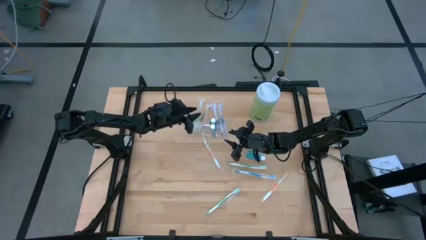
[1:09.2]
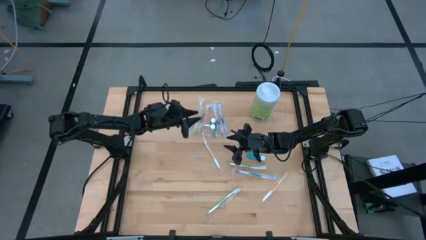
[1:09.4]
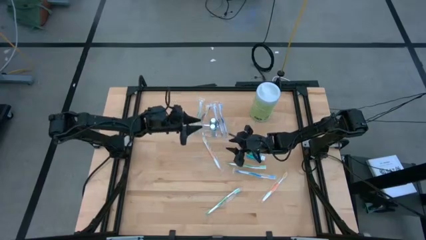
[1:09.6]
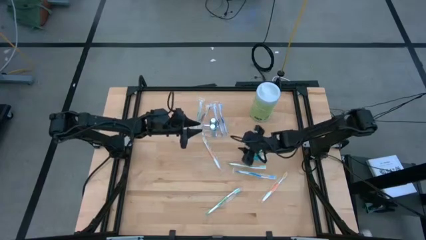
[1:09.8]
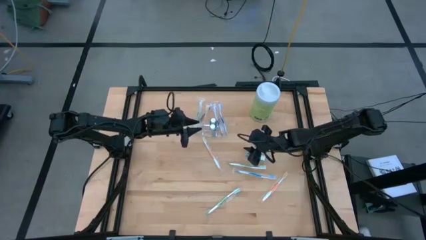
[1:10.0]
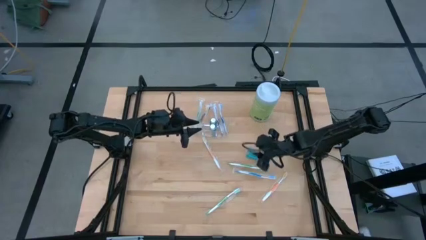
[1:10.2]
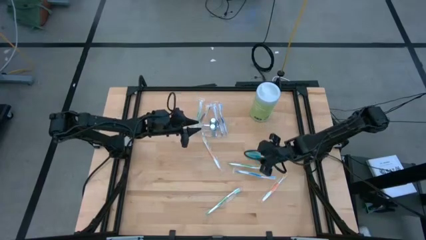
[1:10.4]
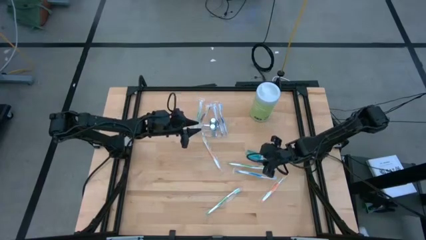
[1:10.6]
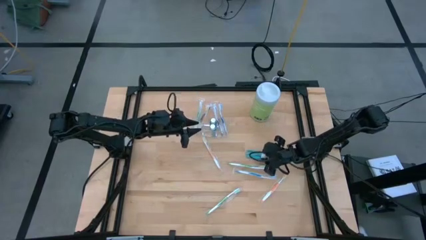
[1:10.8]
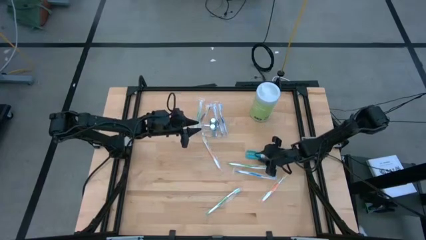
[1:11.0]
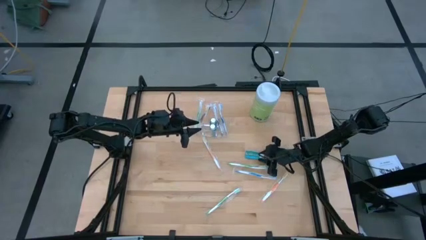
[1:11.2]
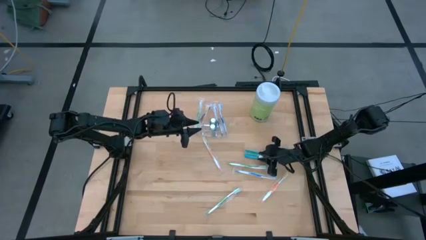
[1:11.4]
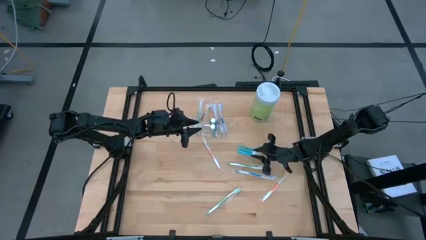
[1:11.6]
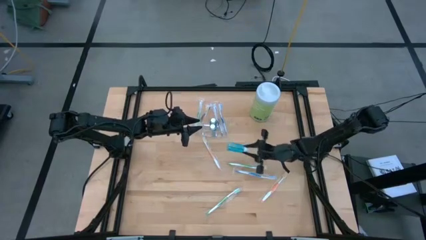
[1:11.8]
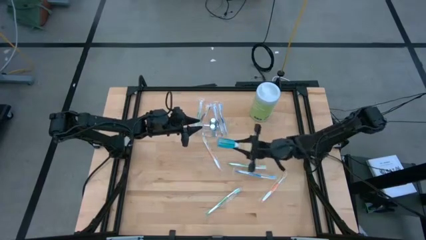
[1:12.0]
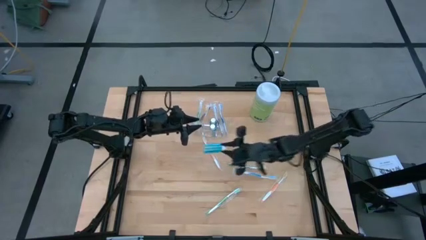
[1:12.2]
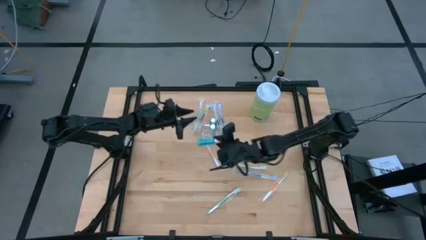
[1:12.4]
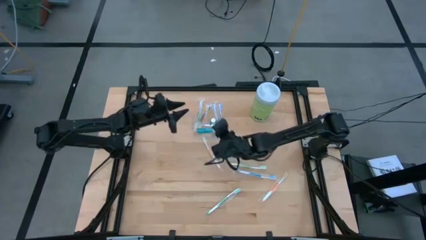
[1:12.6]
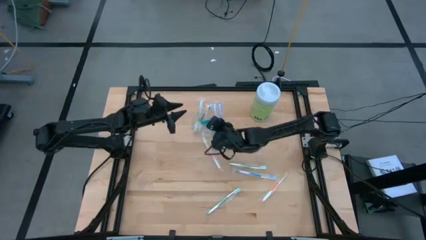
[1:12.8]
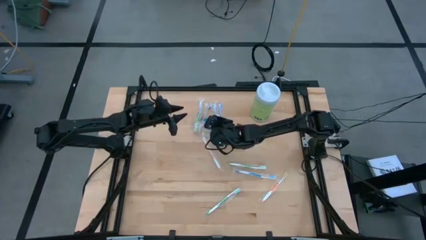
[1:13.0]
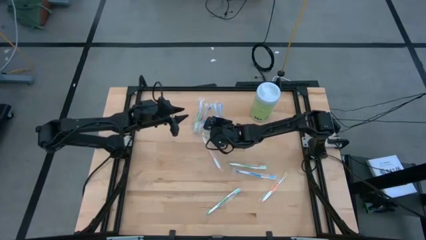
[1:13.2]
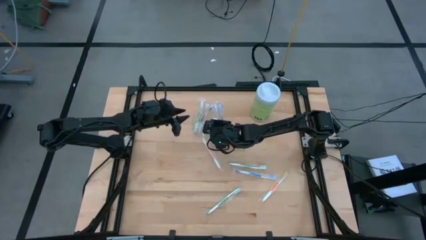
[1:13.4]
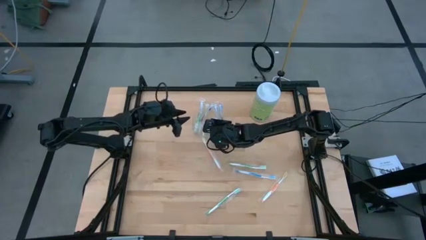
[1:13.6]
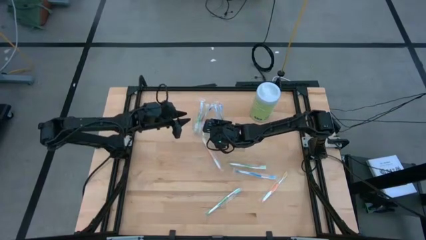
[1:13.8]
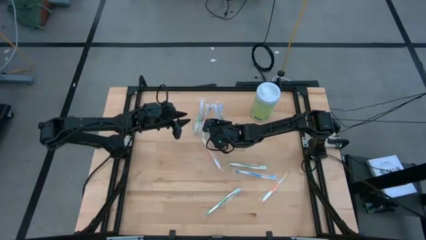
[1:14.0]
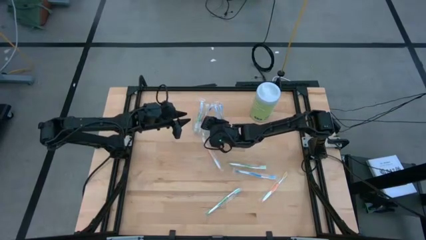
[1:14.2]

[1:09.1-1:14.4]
Task: Pick & Place toothbrushing station
Put the blue mouthwash into the transparent organizer

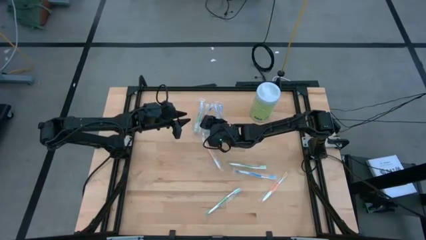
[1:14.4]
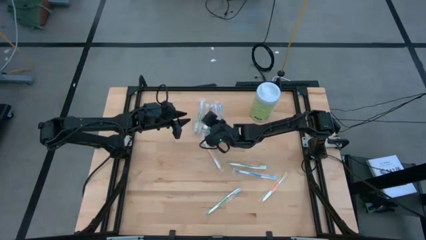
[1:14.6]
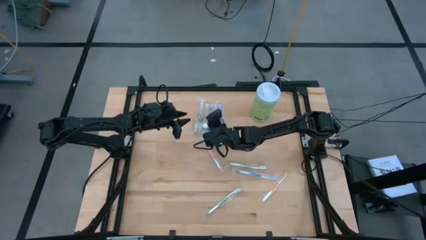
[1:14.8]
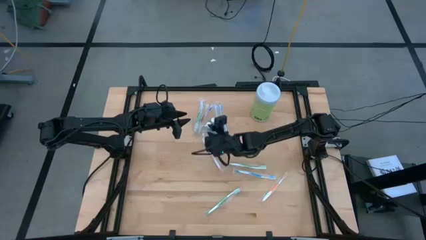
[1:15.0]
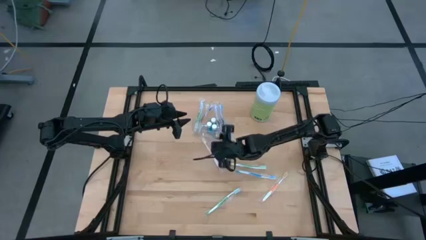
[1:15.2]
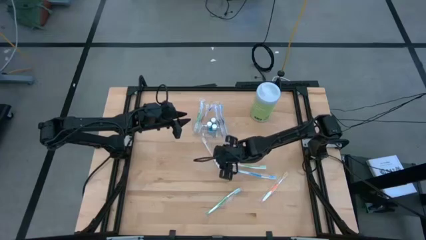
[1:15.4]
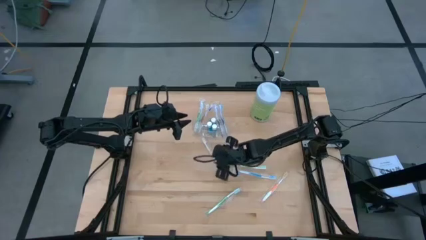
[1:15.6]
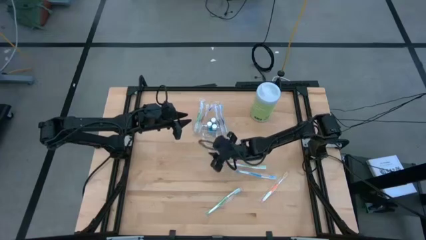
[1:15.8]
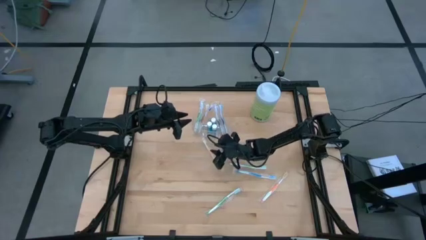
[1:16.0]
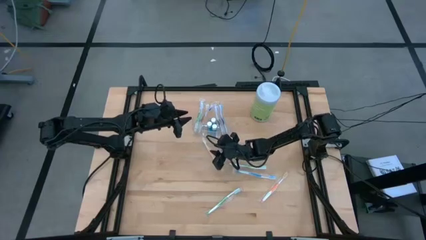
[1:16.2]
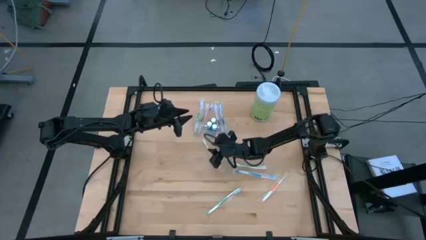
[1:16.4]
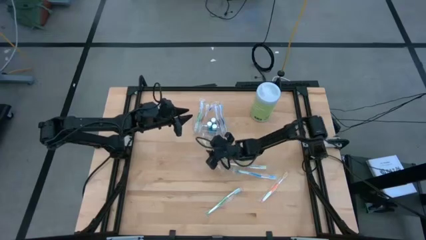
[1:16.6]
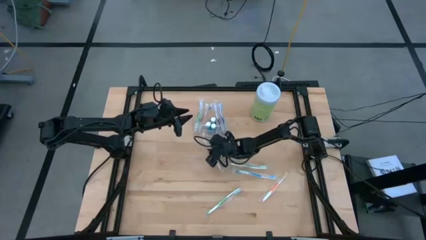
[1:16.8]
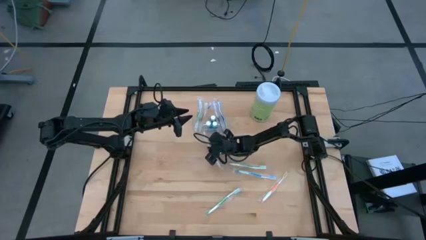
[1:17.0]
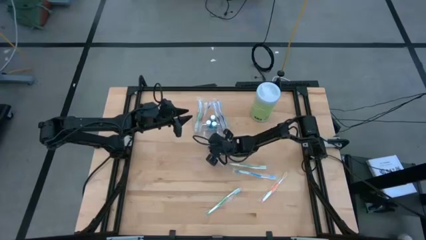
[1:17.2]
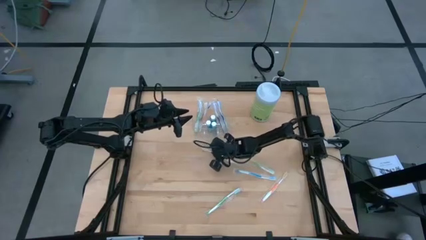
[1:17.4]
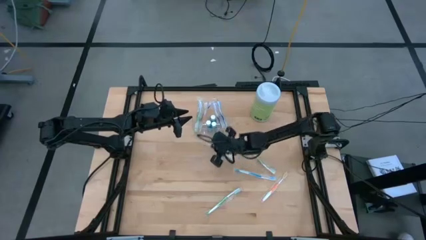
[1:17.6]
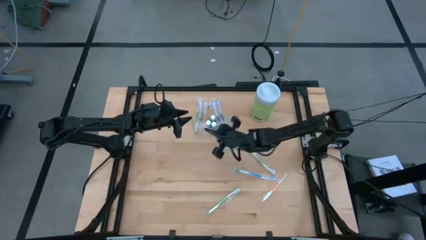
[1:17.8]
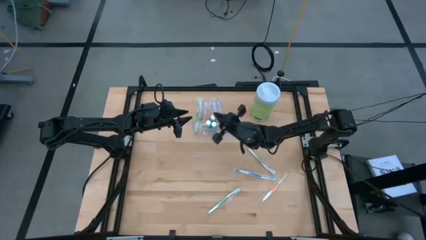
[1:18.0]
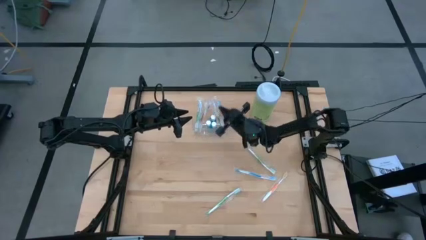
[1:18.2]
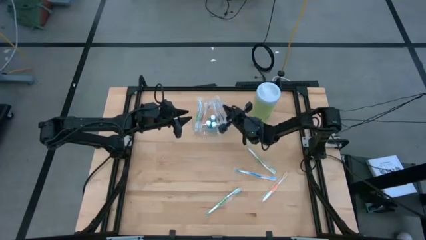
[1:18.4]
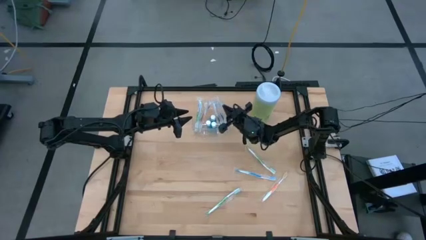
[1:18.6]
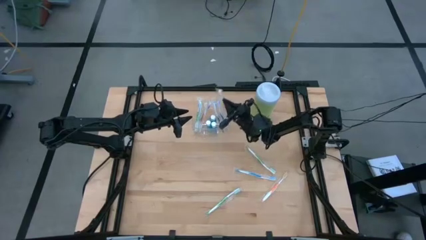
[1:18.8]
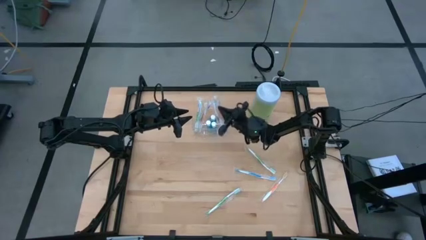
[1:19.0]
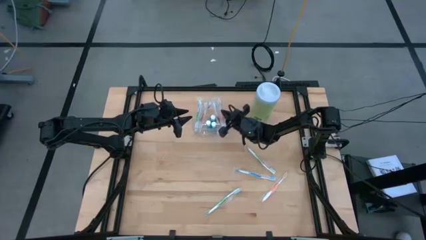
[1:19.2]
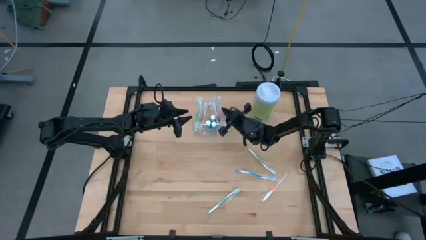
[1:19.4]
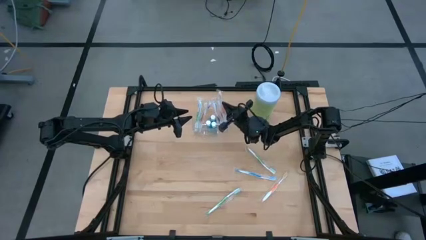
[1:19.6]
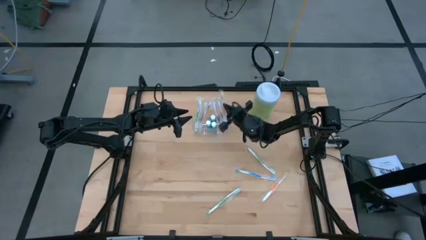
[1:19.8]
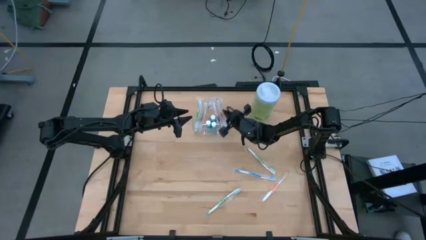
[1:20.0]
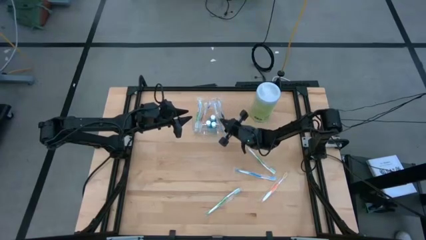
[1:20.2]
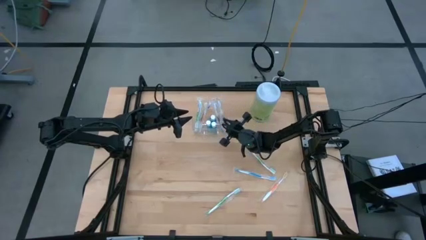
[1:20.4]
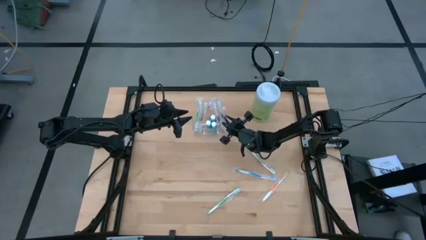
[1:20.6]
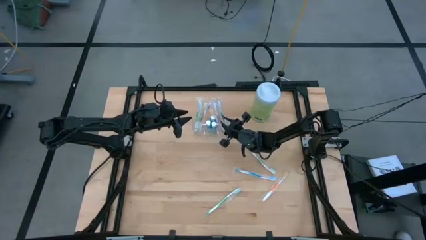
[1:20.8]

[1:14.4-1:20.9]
Put the orange toothbrush into the transparent organizer

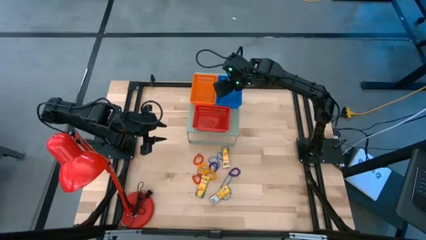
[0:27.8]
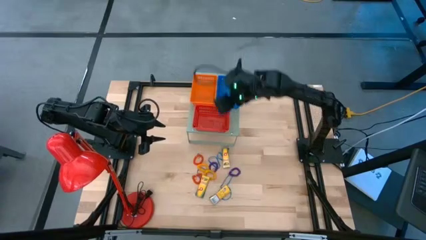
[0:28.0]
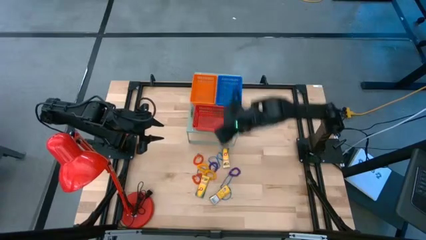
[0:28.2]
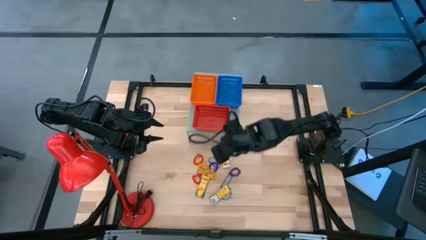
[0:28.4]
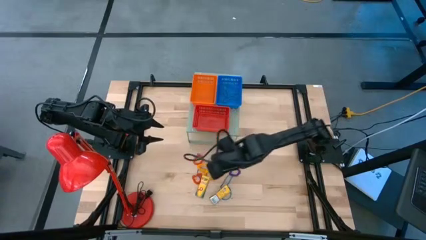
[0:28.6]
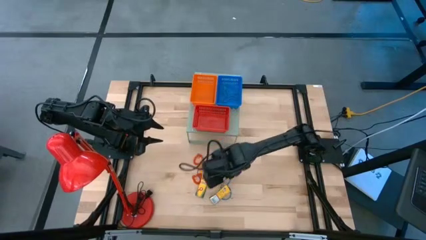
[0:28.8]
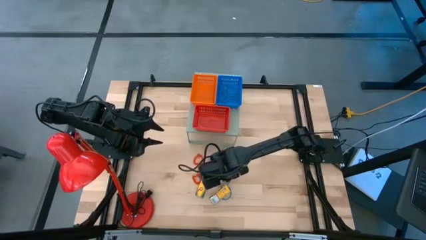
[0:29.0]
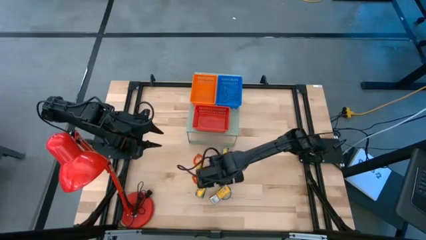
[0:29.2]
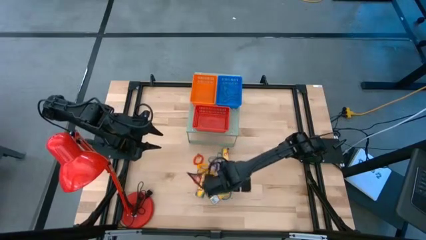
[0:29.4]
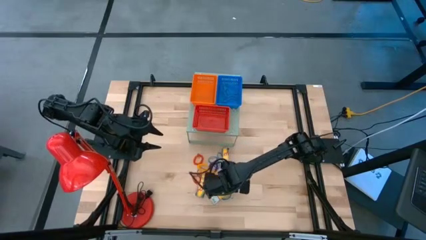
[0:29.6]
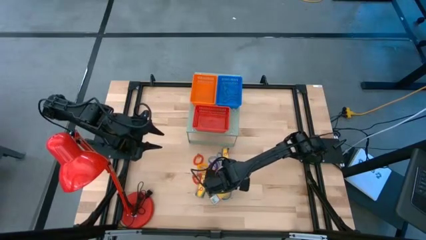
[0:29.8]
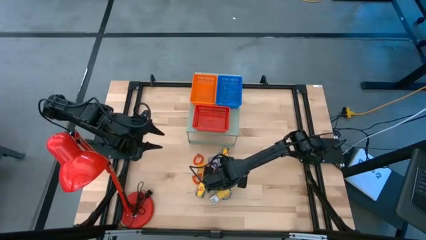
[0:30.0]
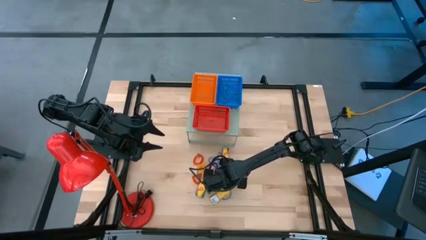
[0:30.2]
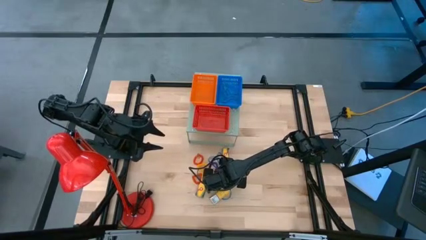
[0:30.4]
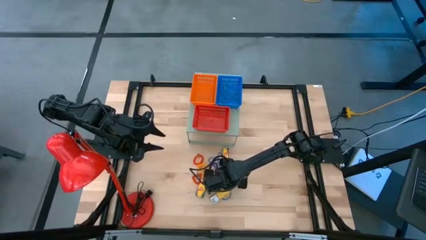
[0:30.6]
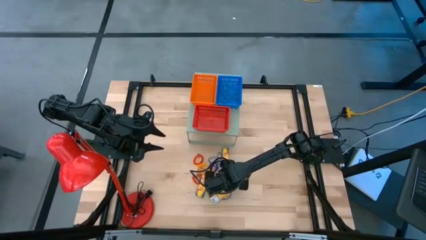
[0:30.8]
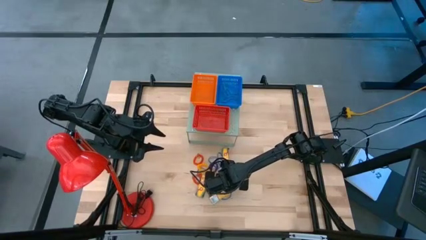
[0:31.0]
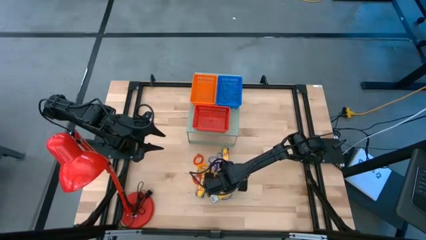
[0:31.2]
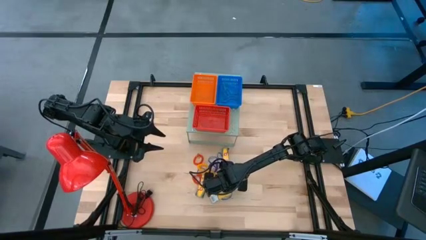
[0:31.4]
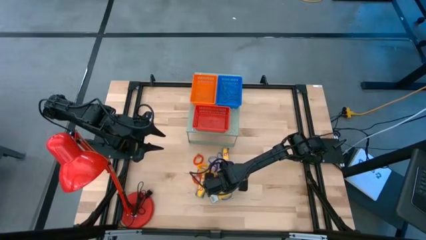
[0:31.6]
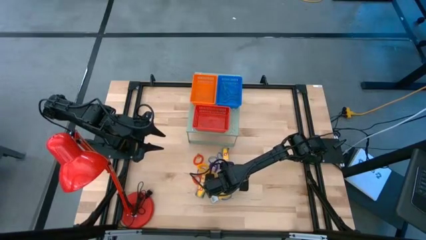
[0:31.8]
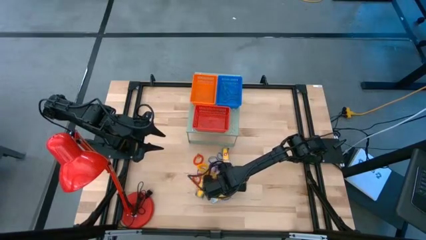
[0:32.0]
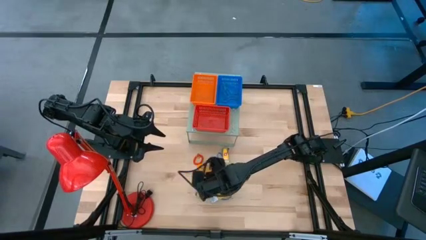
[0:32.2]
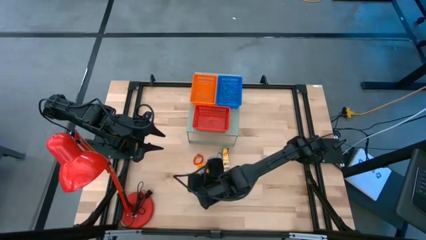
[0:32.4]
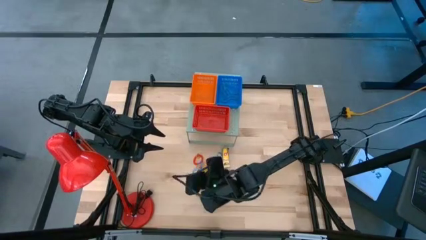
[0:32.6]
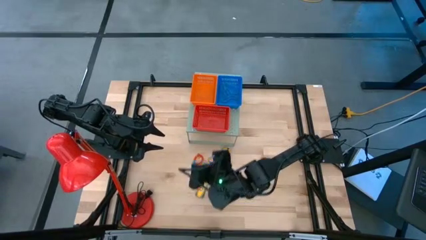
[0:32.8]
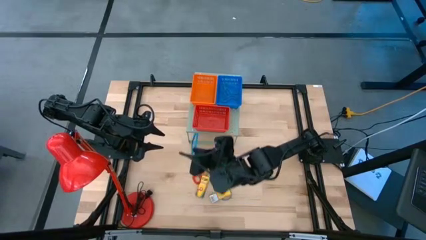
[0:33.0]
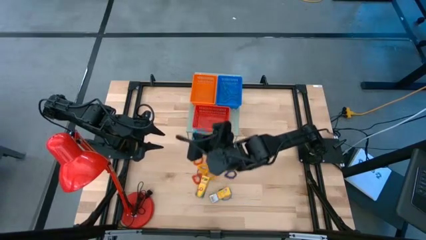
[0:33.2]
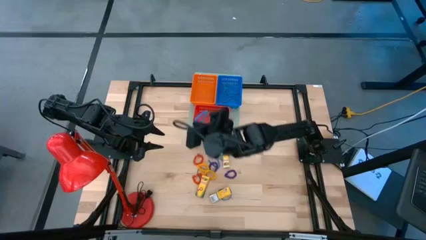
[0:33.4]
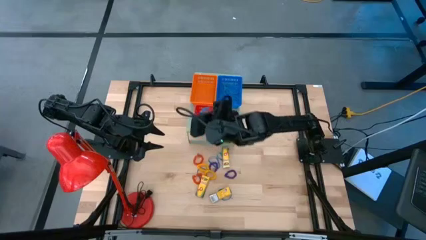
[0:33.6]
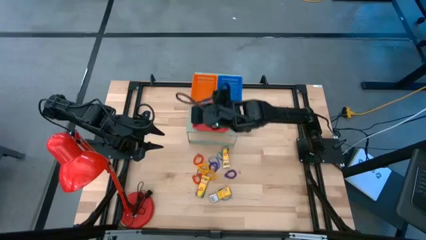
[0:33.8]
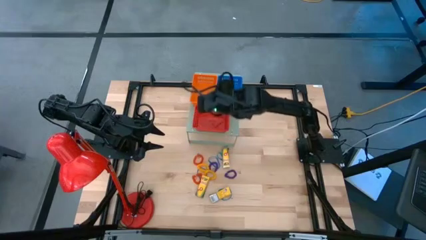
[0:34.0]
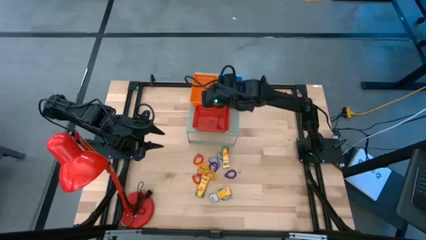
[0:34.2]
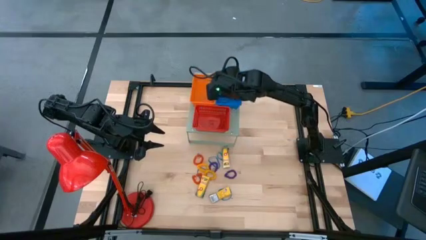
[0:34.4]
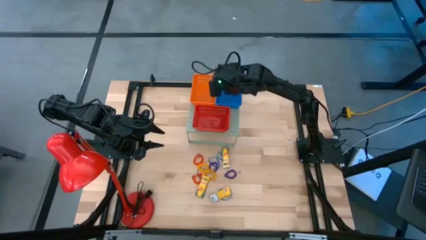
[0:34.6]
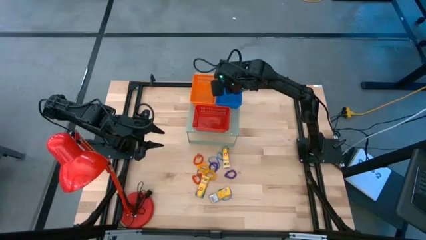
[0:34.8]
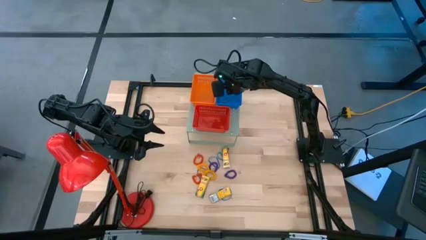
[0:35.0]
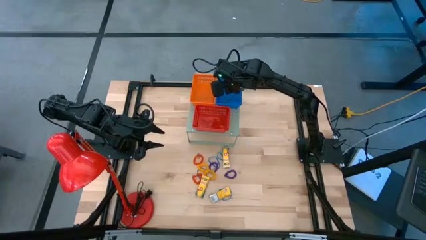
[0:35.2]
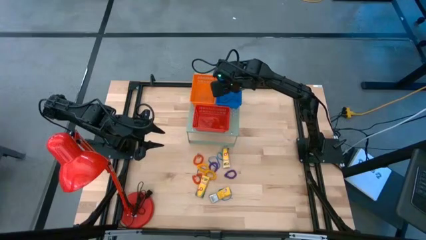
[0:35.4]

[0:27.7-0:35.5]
Task: Pick & Place Office Desk Supplies
Put the blue rubber band into the blue bin
